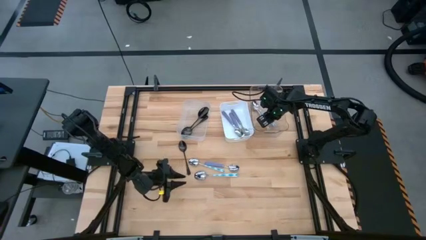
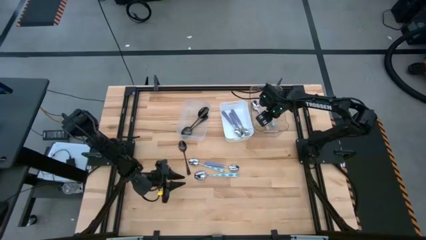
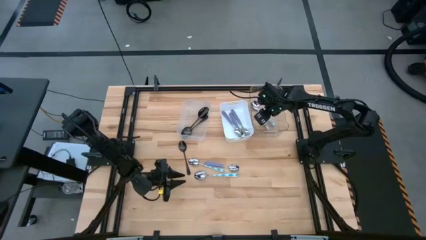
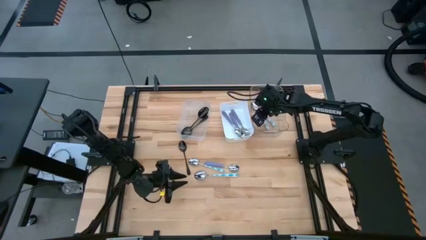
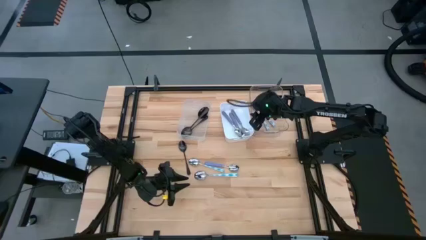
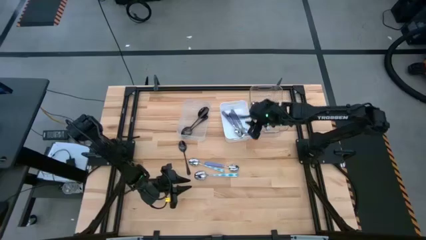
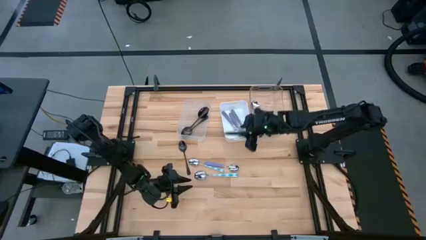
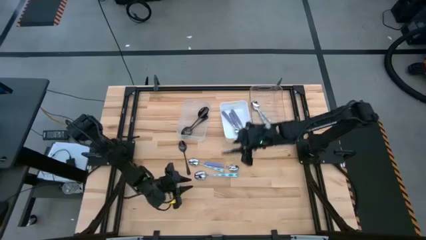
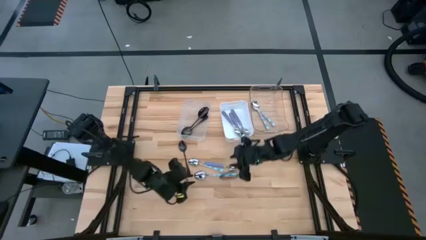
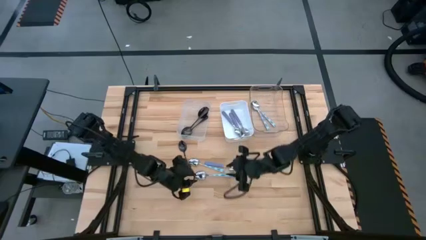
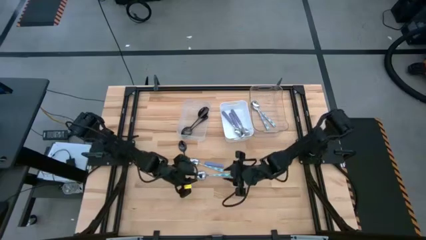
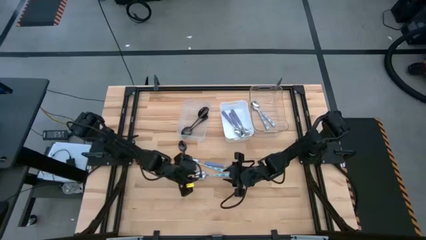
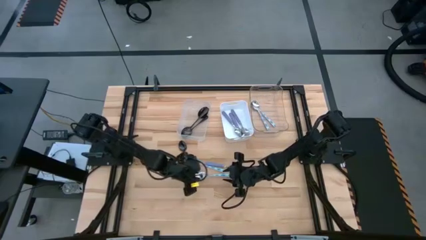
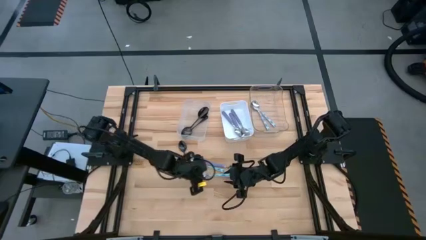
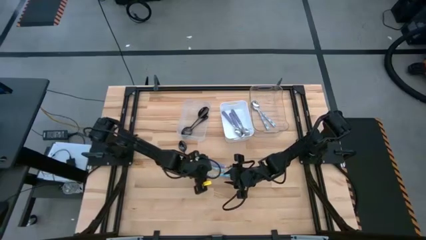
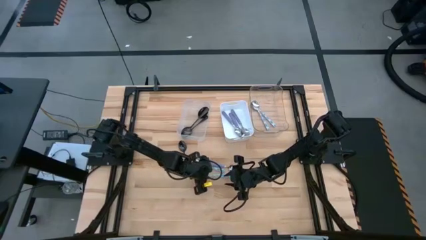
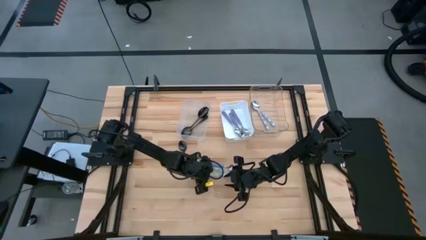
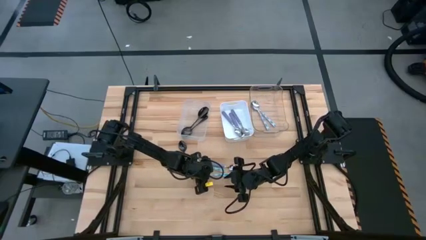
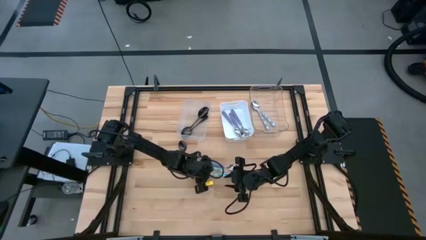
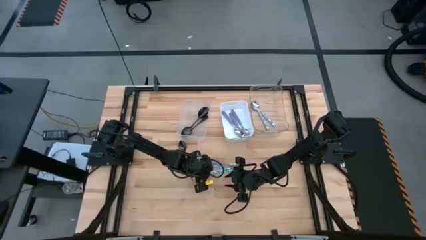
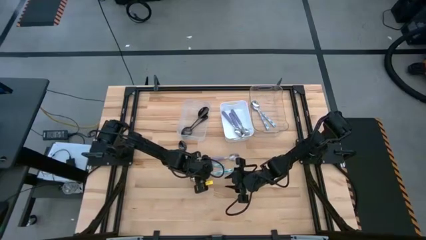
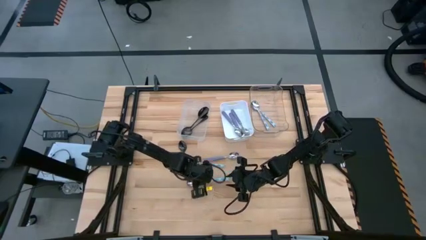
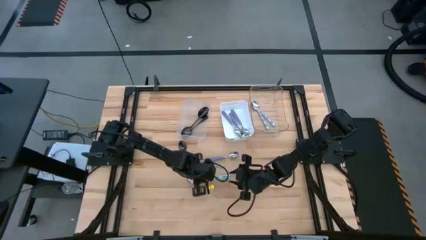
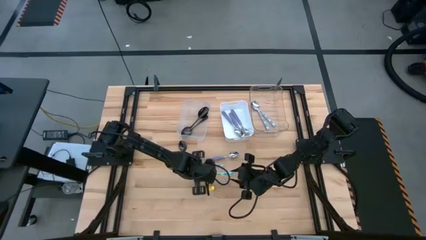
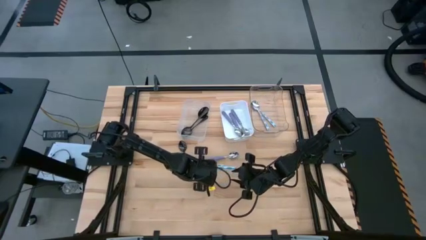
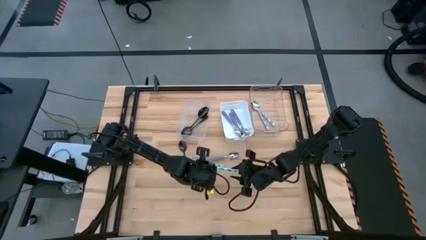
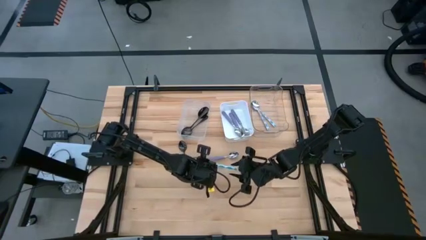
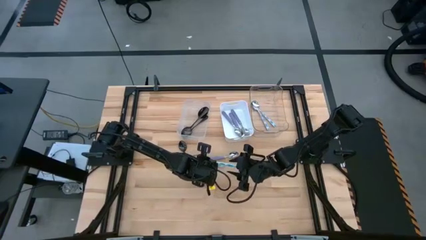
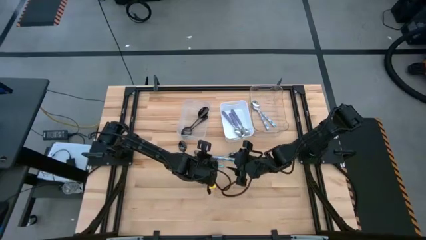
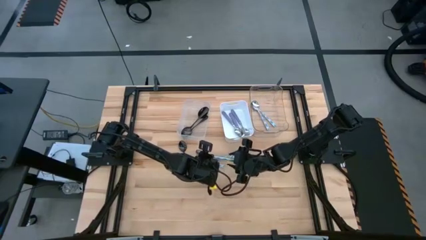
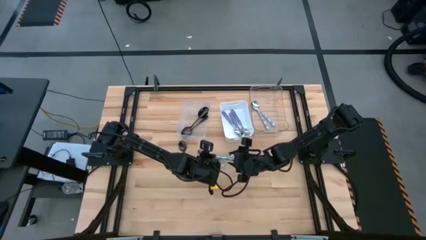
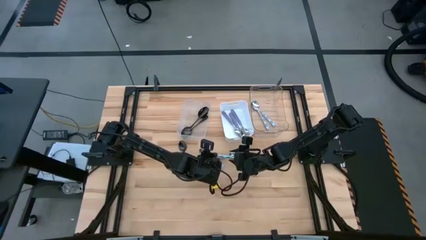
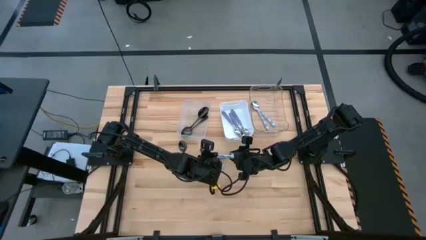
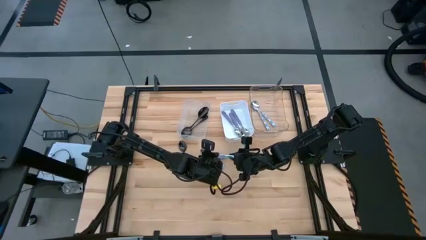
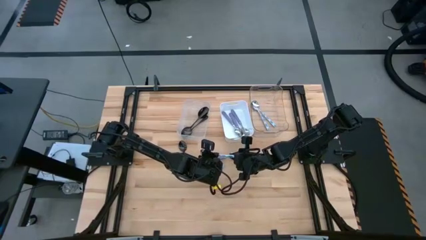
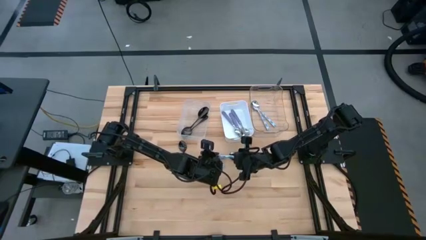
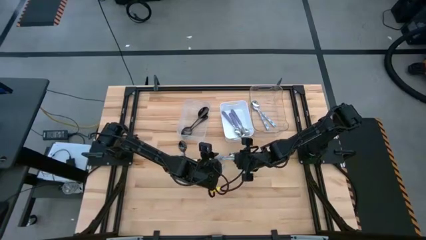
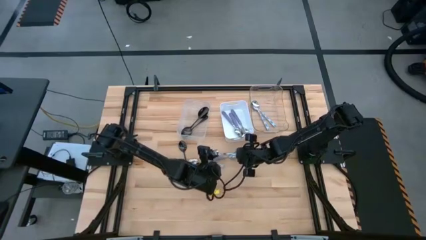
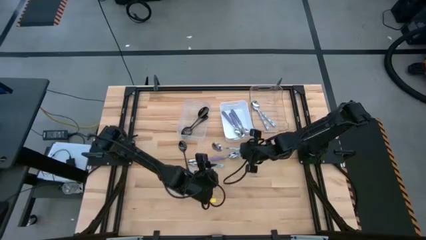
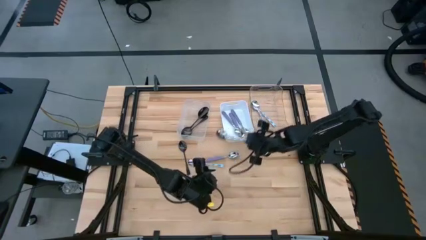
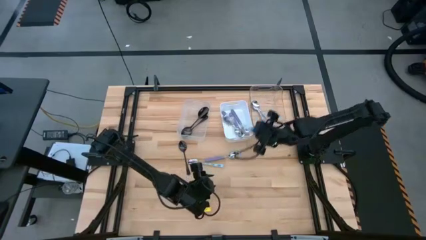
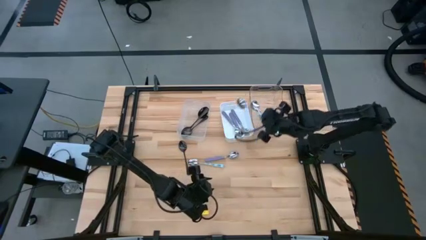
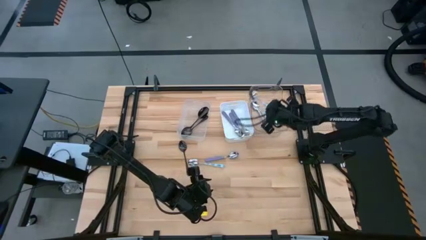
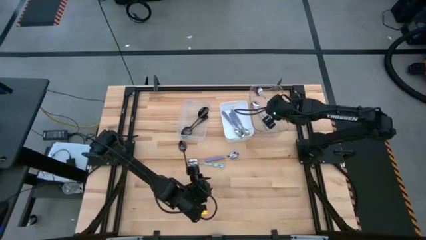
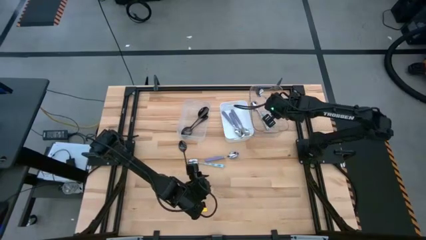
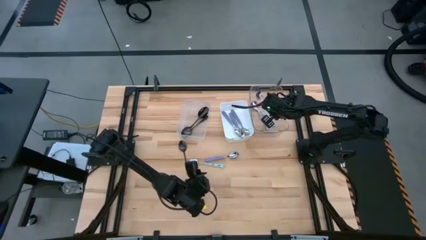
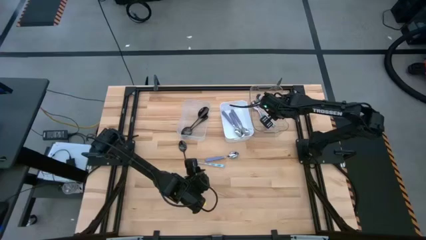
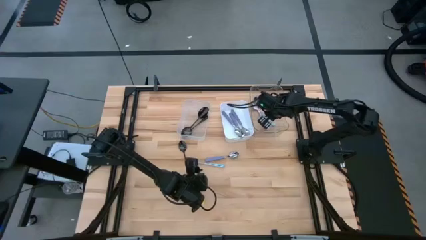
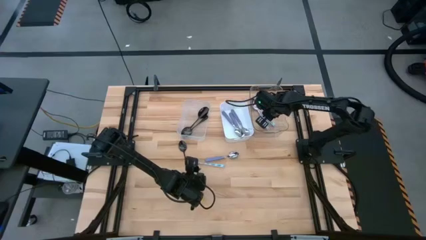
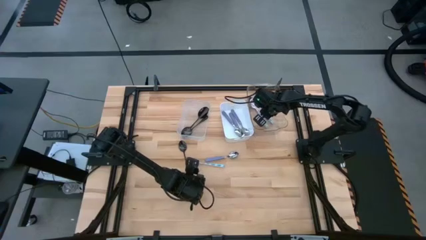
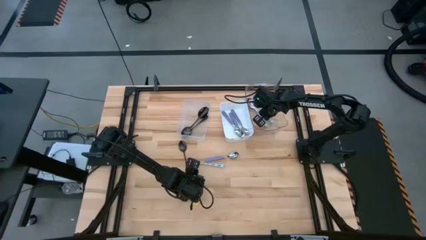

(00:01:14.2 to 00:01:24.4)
Task: Sort silverware by color (type)
Put the blue spoon into the right transparent bin

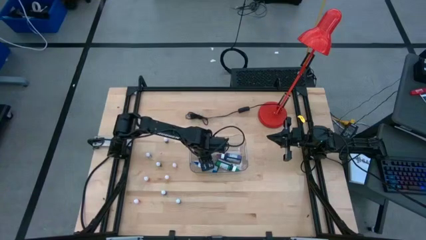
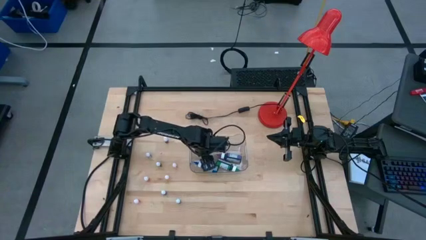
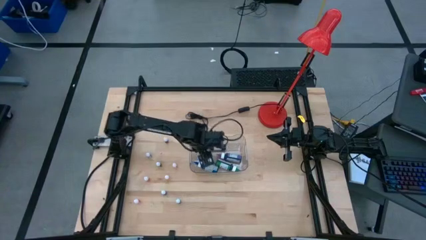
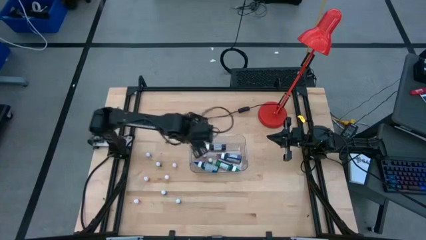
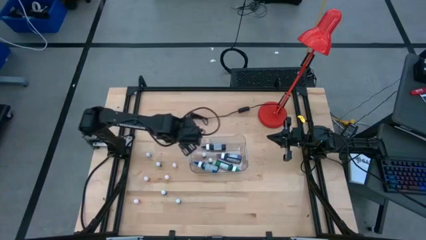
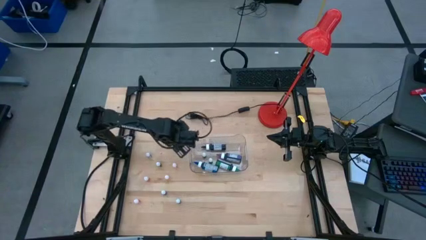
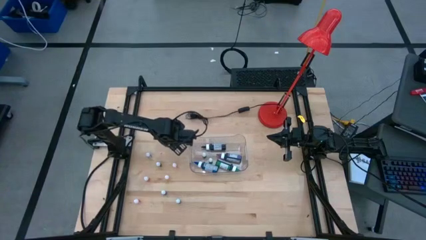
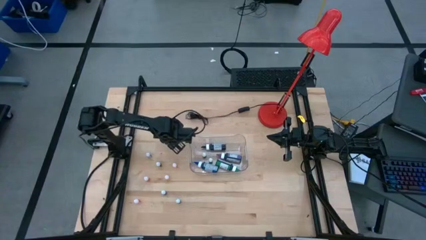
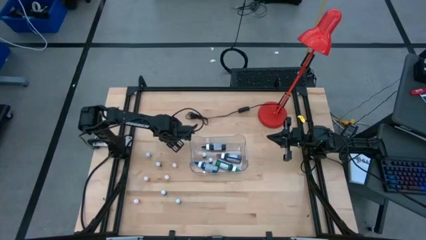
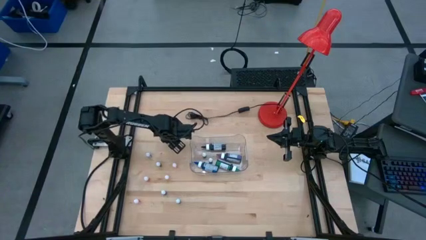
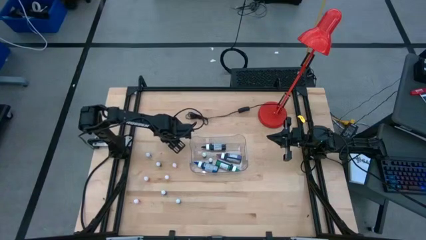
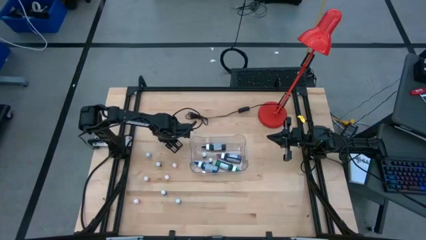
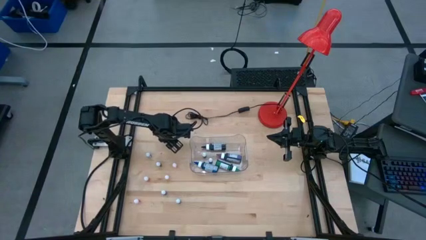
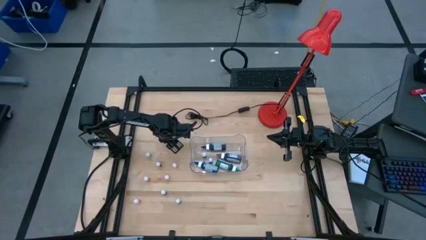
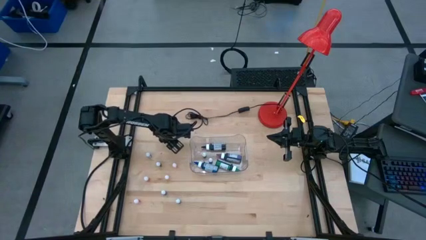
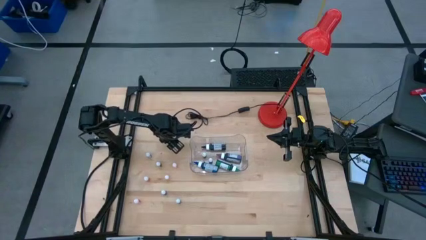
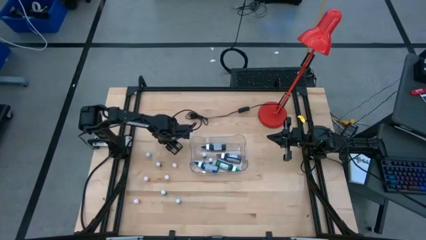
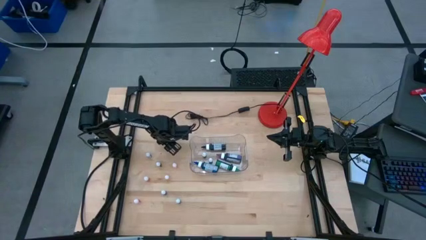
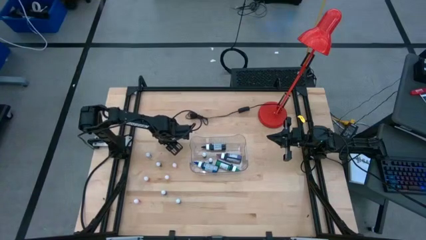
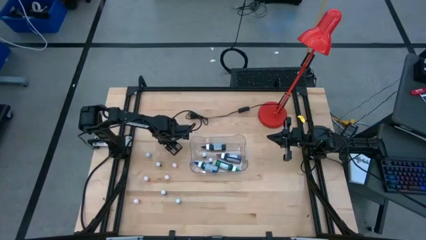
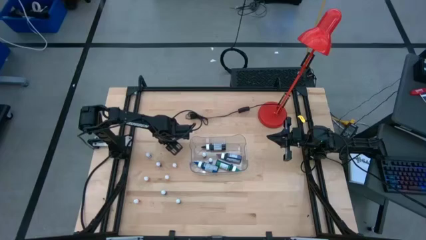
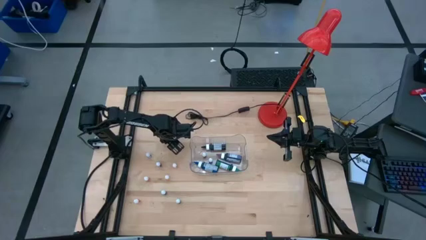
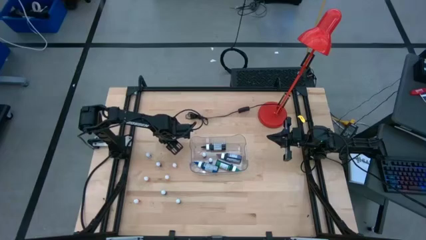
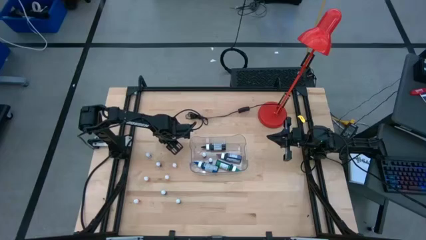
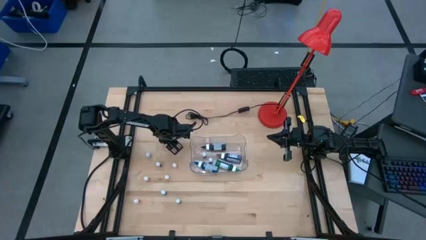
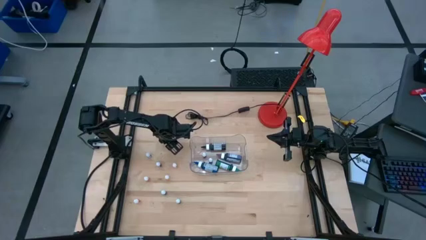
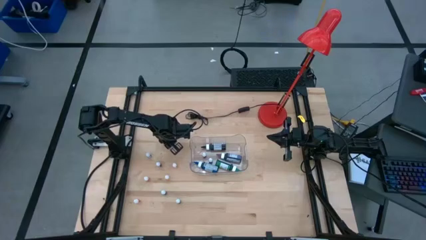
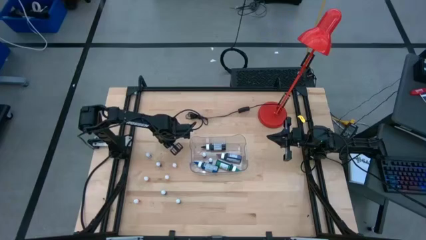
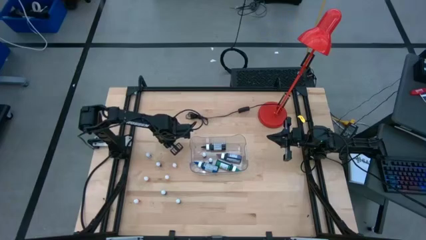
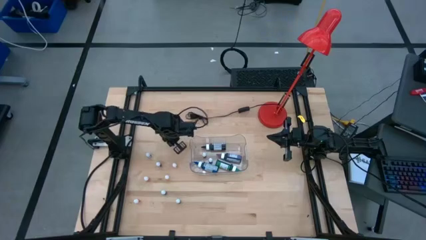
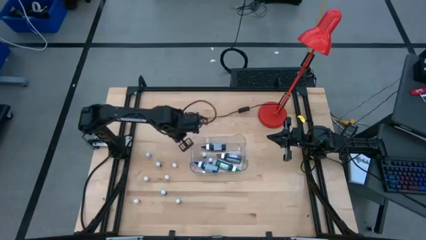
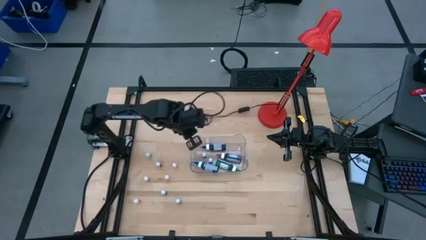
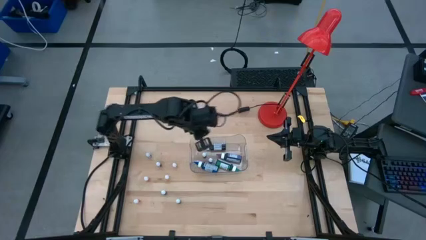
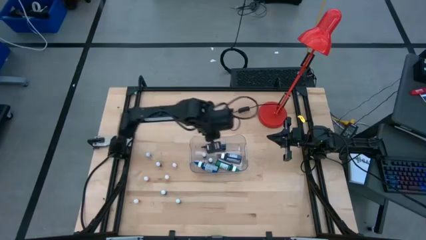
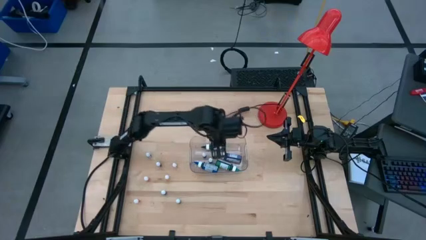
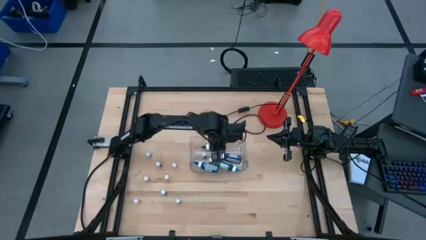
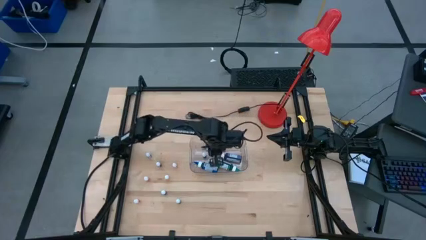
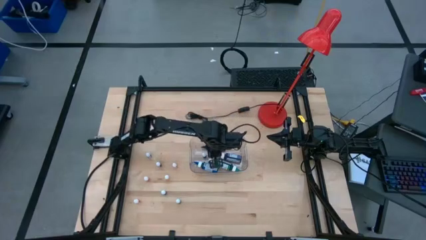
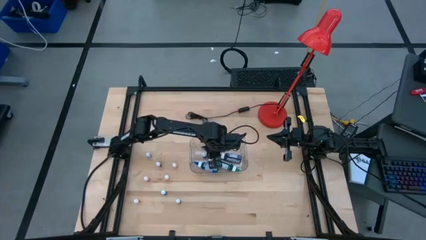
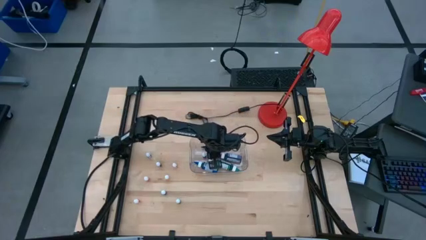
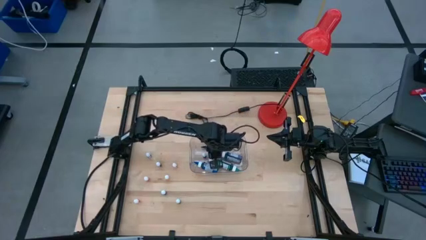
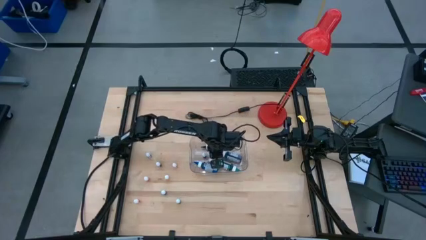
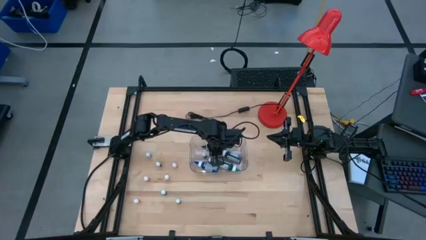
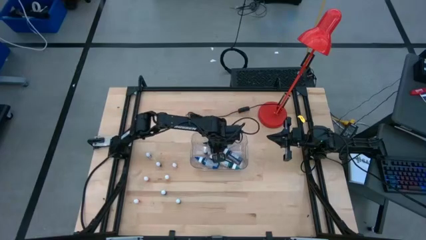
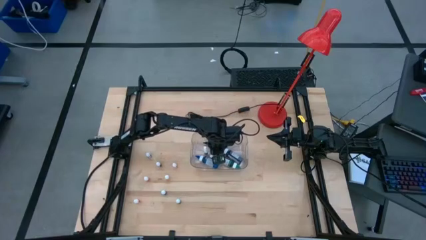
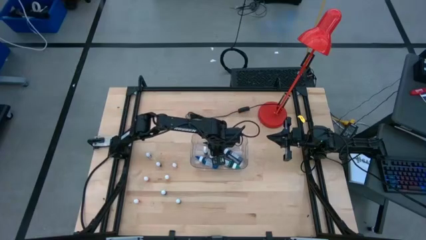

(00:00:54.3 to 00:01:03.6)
Task: Pick & Place food coloring
Put the small orange food coloring bottle into the transparent bin
